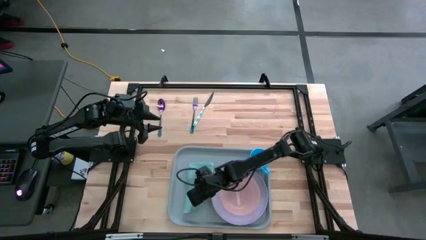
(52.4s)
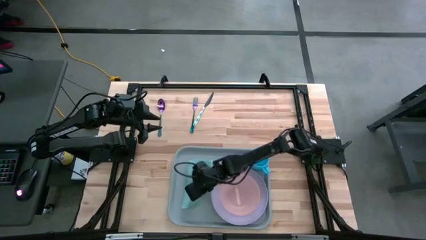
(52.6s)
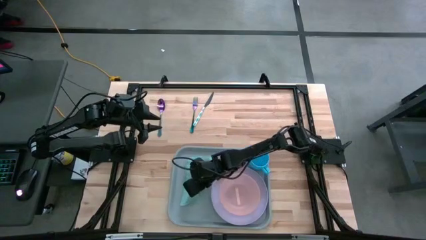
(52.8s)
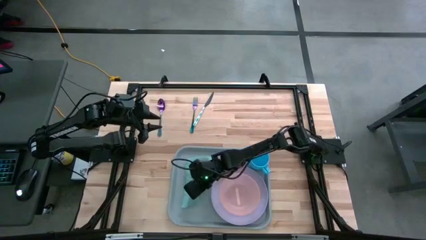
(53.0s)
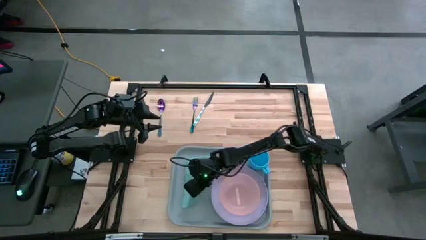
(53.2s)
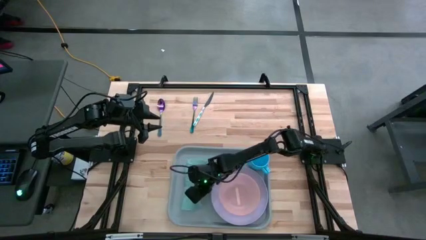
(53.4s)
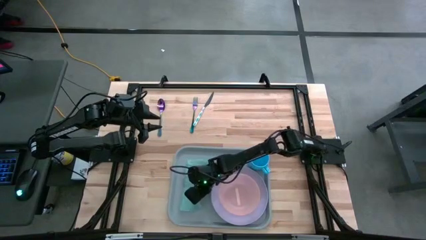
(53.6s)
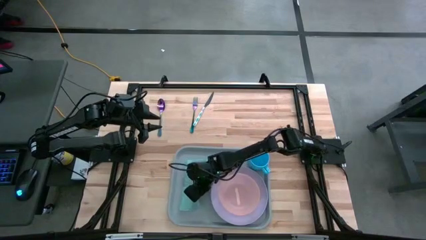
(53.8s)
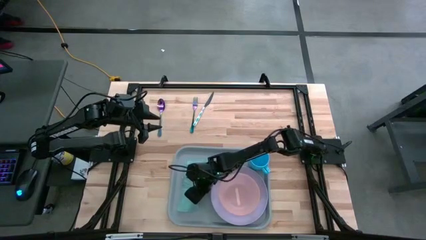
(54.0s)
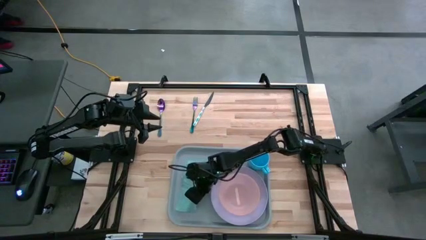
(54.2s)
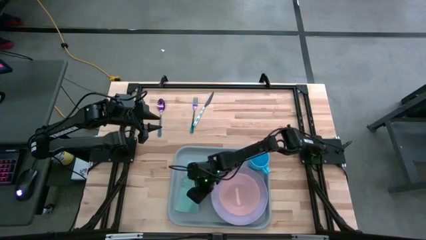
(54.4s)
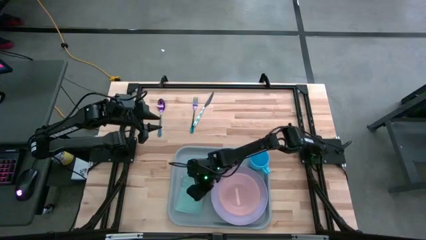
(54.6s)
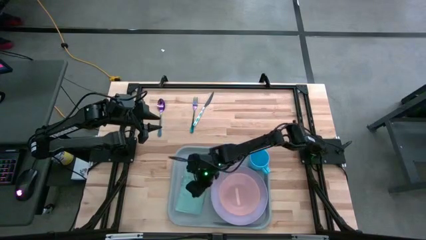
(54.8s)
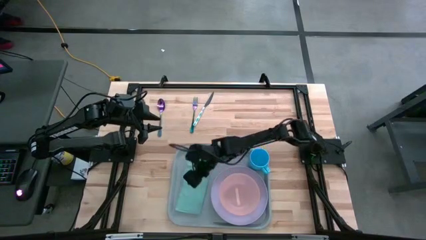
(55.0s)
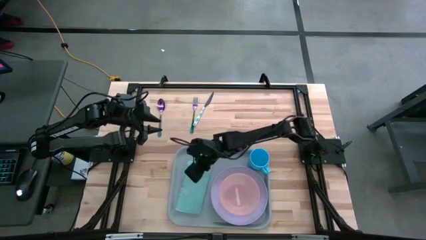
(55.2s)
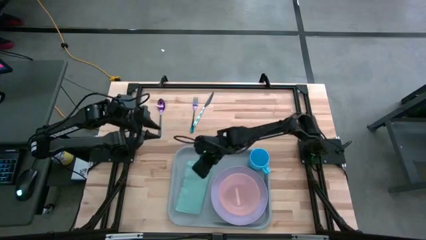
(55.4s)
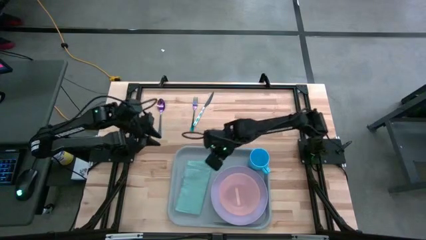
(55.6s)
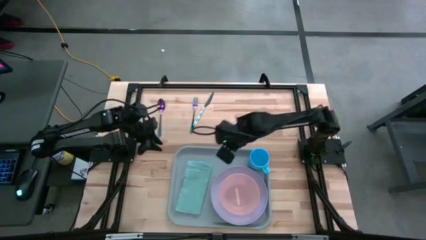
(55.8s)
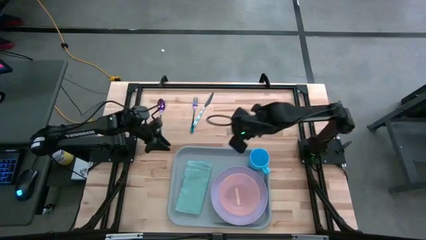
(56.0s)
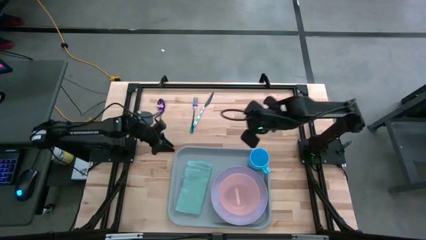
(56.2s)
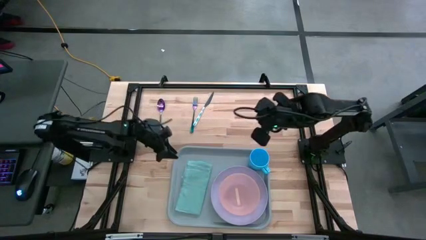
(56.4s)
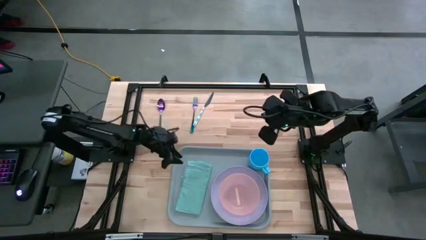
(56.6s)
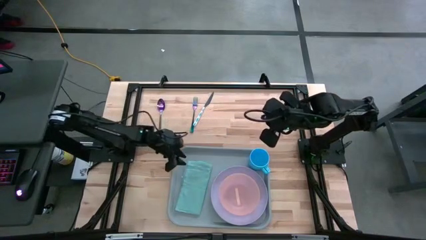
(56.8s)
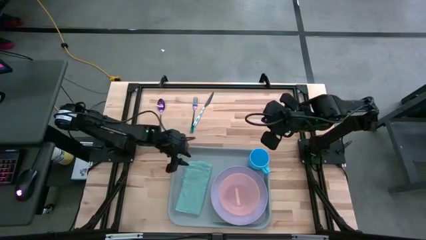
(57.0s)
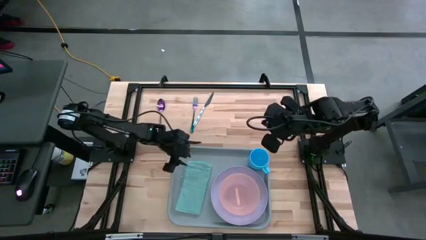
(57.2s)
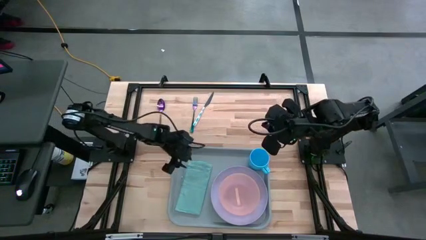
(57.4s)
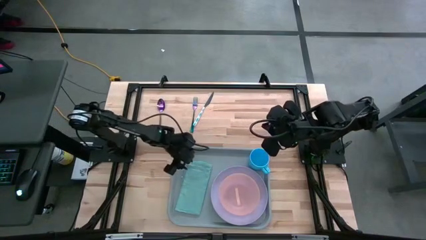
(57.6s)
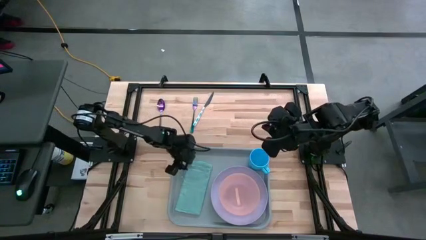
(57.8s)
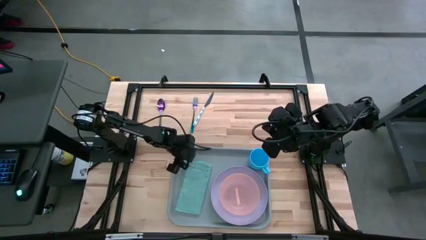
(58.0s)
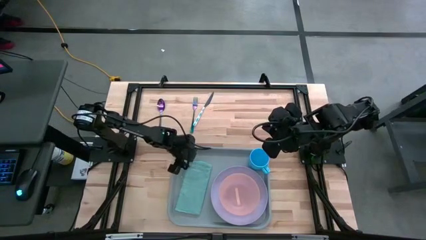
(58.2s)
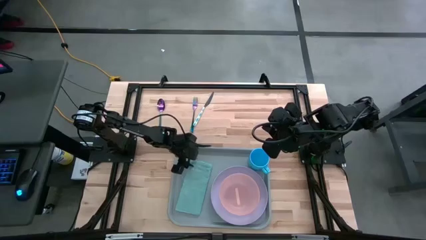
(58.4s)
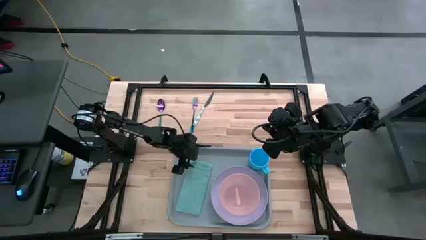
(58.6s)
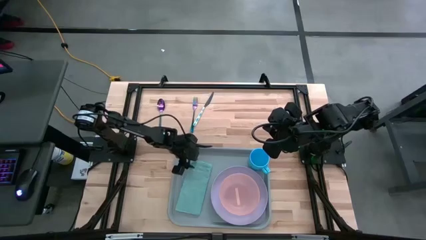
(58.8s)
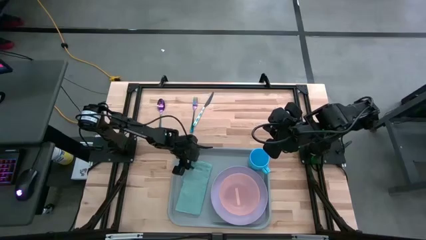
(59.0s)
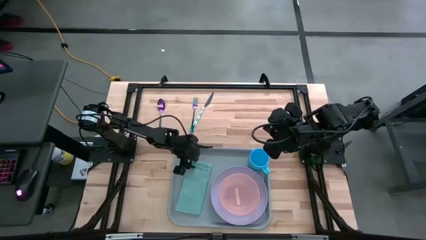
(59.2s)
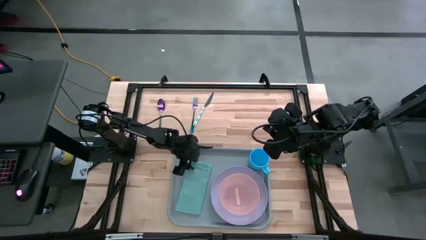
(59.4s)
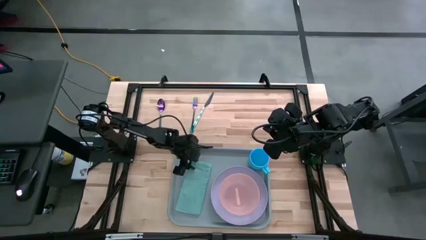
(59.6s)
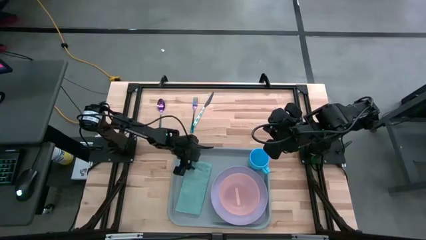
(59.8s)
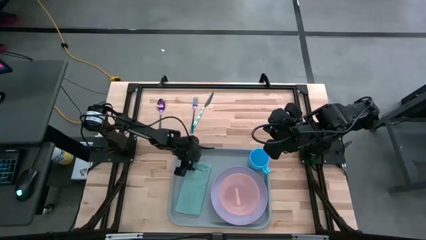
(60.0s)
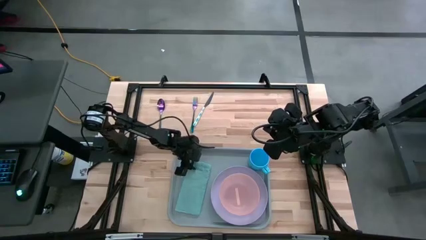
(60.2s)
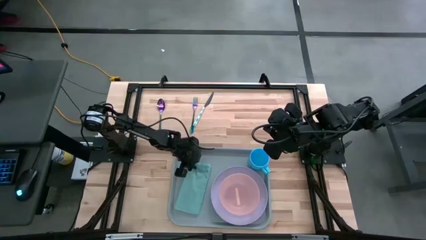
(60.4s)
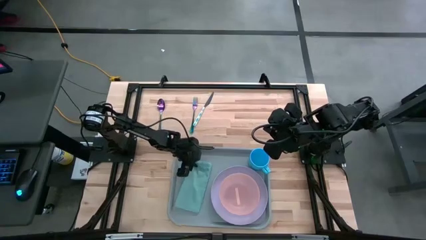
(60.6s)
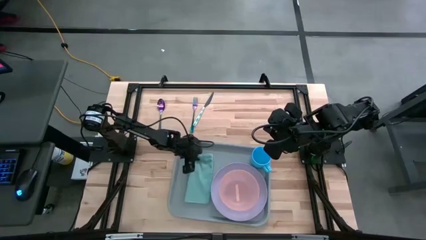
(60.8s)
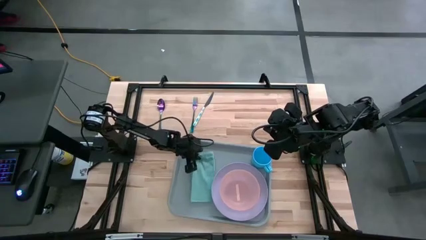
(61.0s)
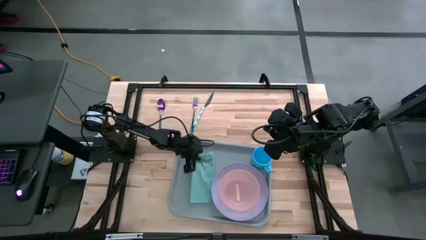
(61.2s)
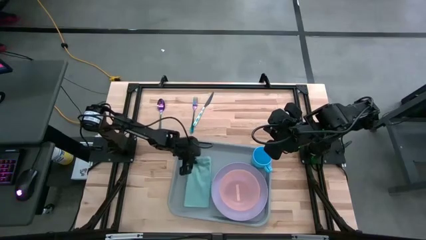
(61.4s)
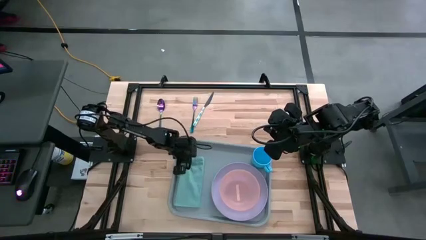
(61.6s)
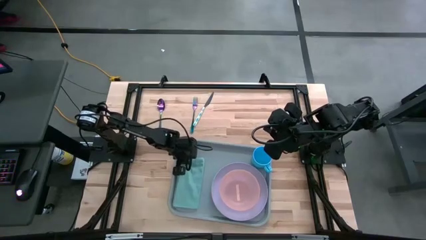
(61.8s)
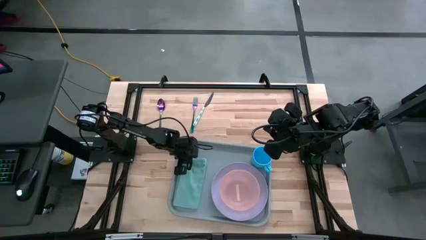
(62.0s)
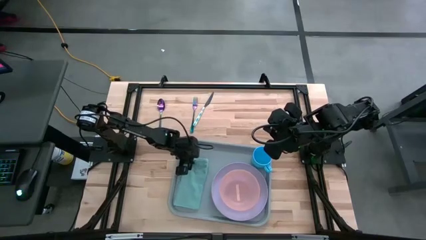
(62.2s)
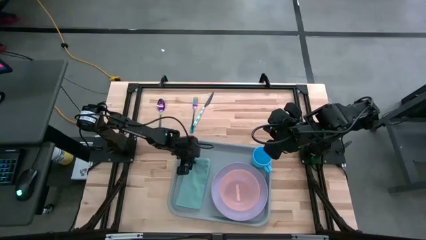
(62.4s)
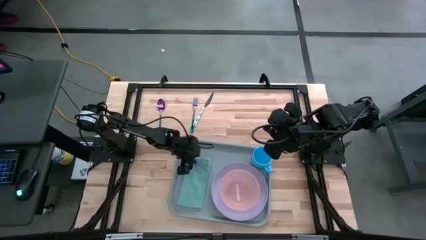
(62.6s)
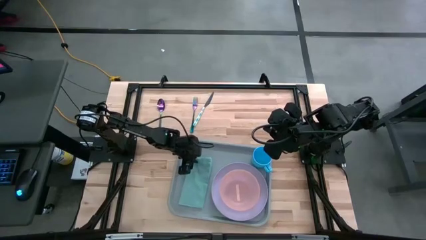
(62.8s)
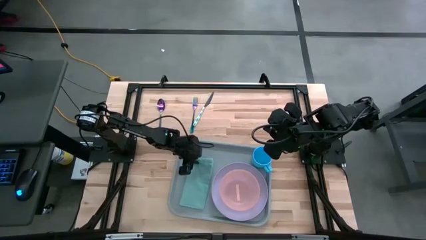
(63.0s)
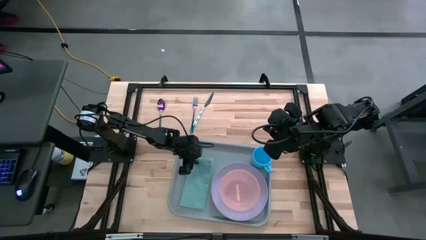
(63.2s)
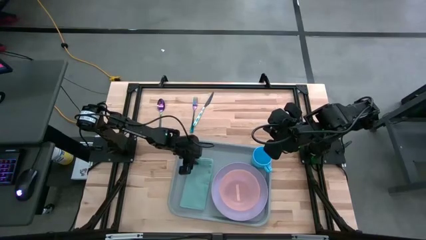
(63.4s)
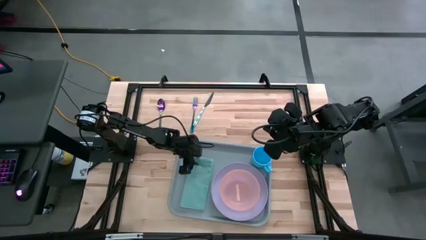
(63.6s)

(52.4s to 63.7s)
Task: Set up tray
Put the blue napkin on the gray tray to the left of the purple plate

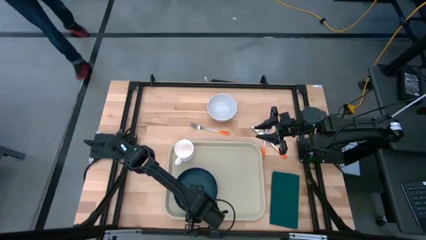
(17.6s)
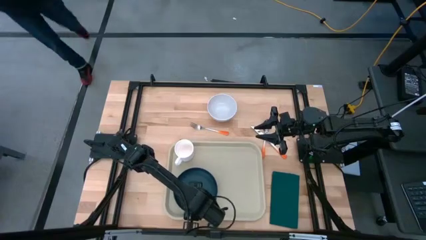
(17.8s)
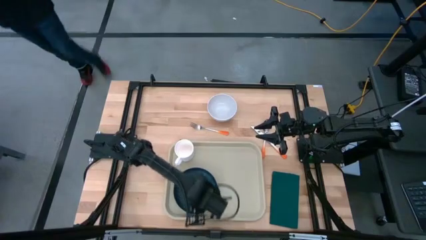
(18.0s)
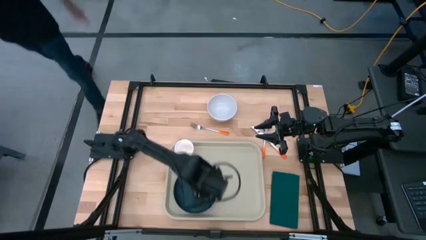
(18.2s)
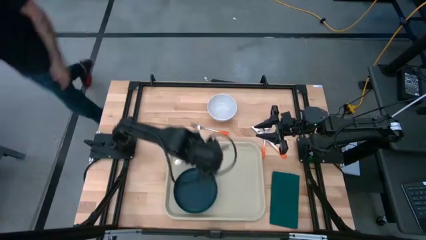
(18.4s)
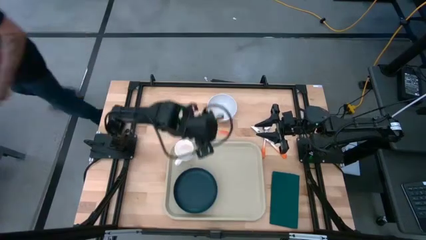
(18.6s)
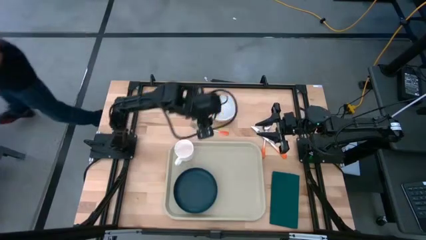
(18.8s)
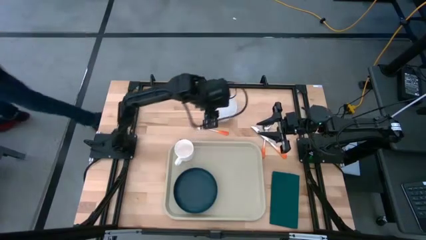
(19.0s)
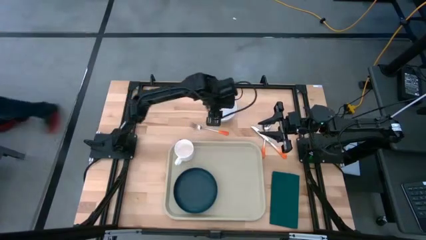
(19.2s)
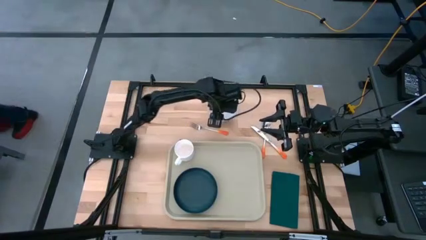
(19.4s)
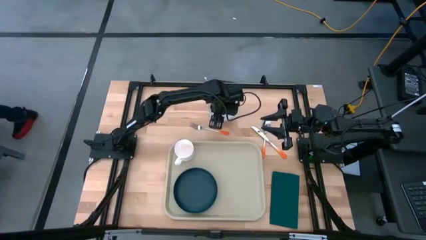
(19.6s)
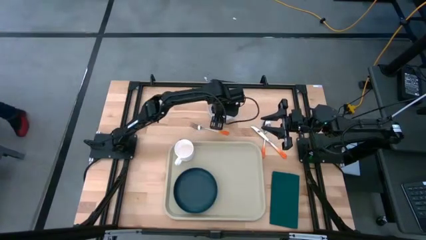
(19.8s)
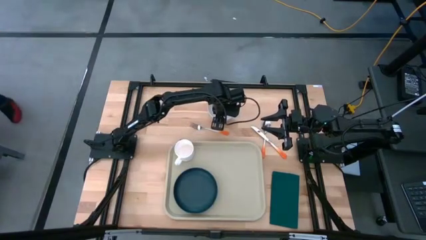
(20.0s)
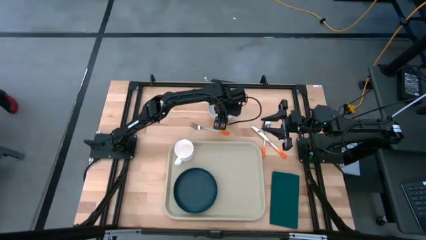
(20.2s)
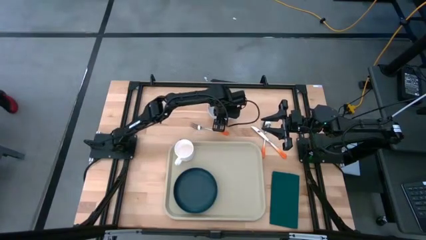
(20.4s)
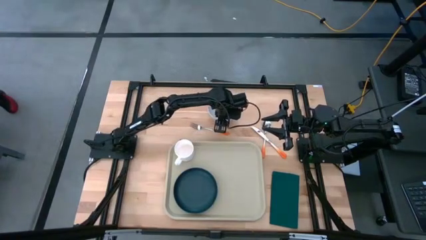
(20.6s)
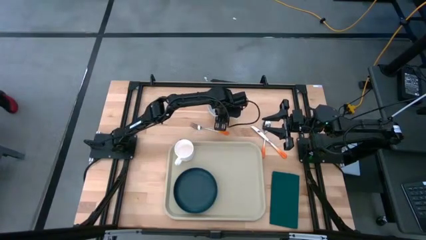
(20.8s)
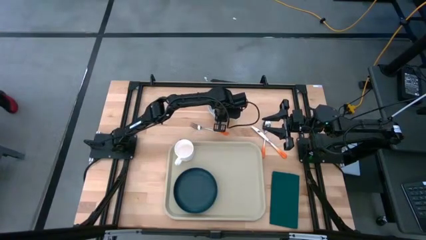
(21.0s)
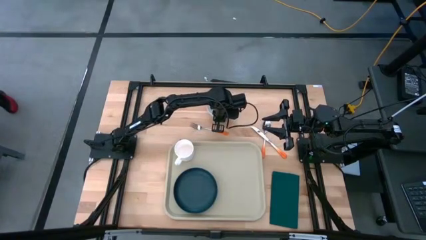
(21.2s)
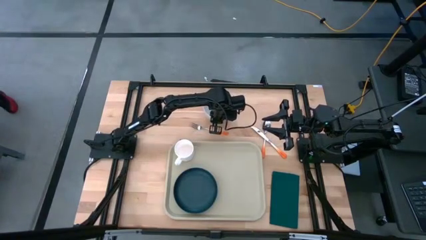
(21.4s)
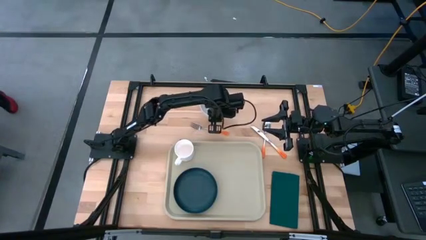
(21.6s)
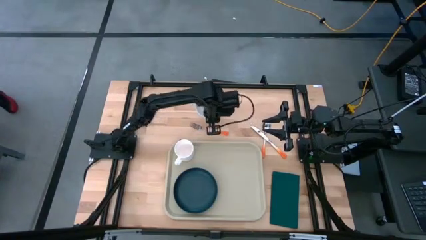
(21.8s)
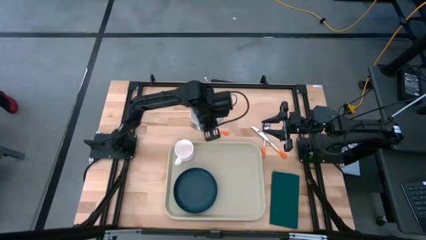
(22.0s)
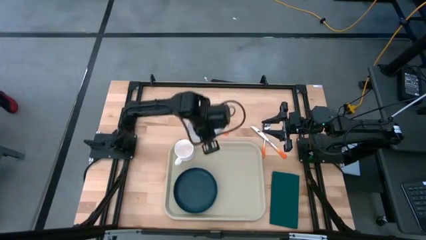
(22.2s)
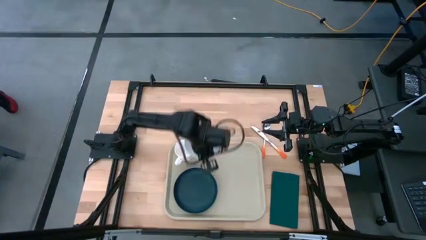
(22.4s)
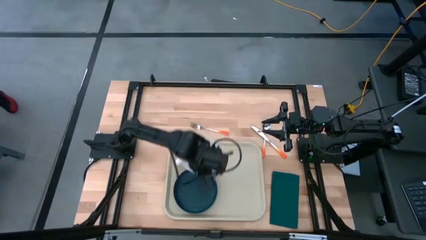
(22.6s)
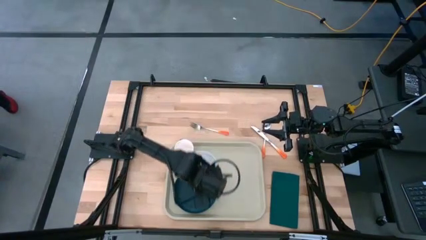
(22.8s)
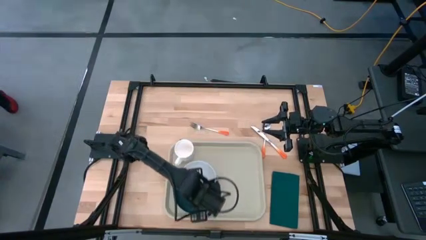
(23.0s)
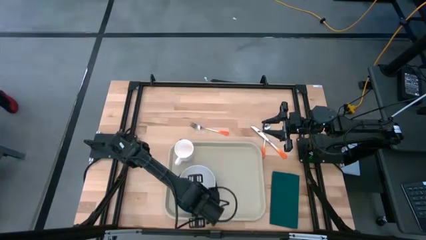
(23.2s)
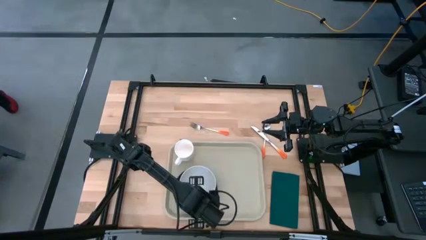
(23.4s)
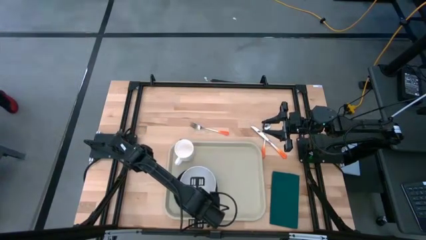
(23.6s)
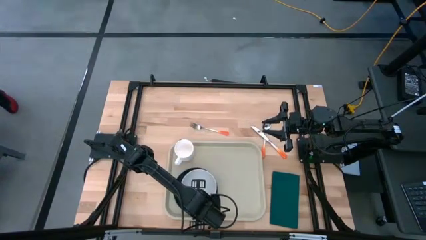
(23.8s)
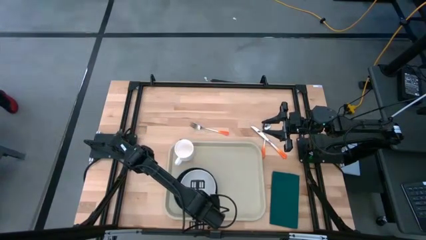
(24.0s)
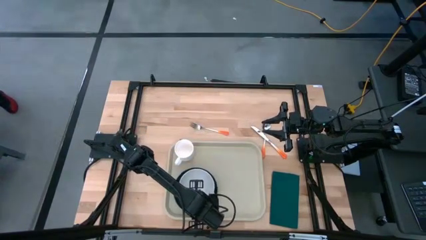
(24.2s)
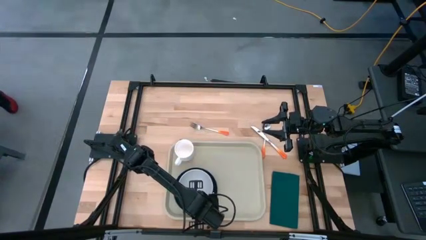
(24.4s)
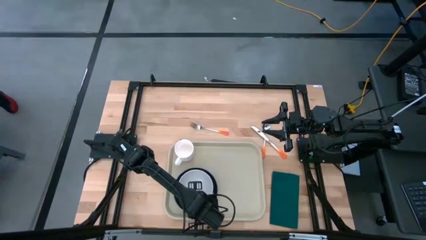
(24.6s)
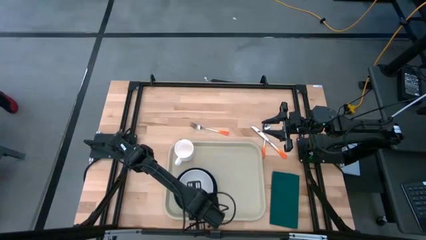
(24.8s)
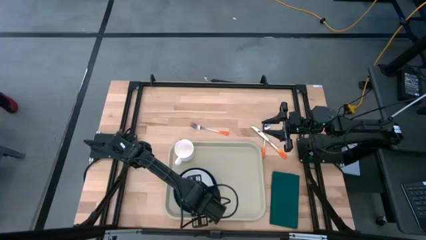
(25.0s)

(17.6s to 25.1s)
Task: Set up tray
Put the white bowl on top of the black plate on the serving tray
